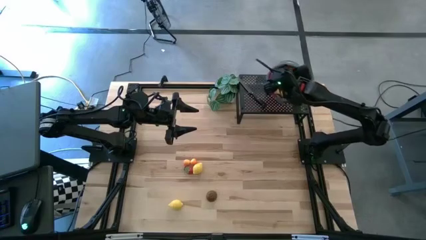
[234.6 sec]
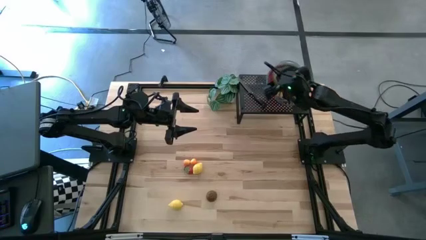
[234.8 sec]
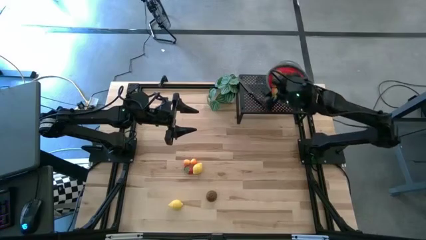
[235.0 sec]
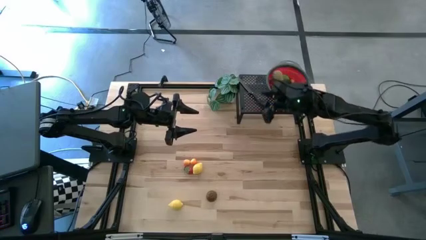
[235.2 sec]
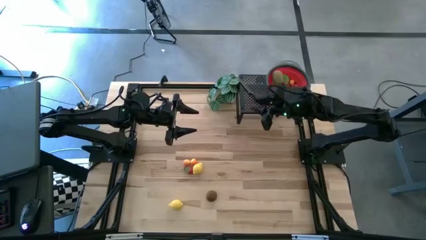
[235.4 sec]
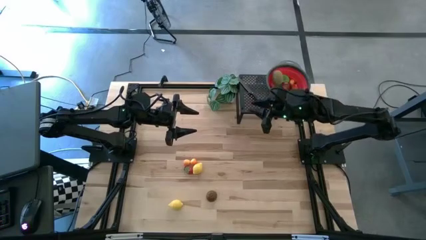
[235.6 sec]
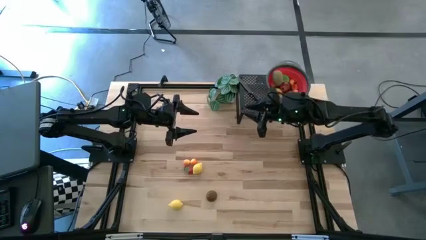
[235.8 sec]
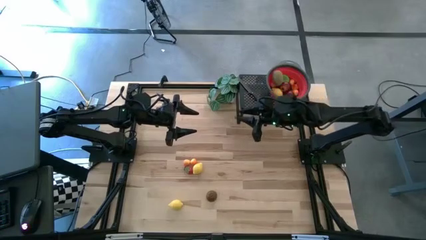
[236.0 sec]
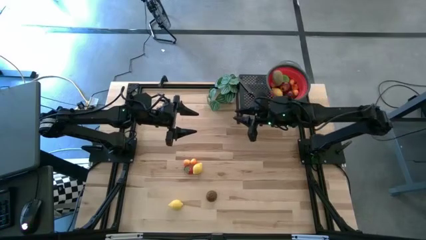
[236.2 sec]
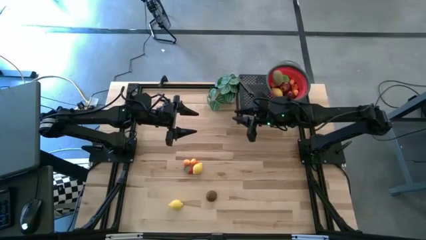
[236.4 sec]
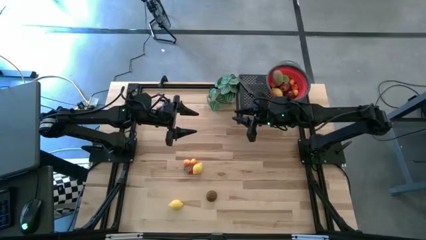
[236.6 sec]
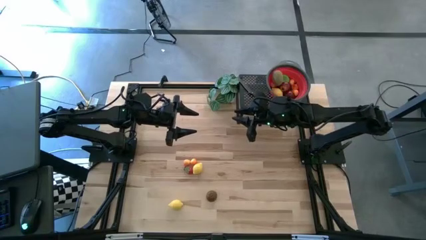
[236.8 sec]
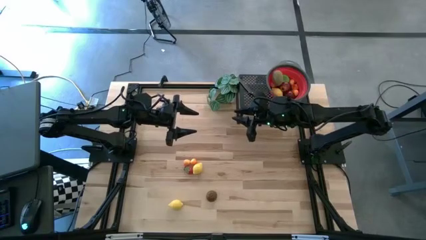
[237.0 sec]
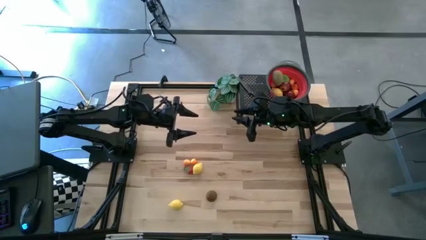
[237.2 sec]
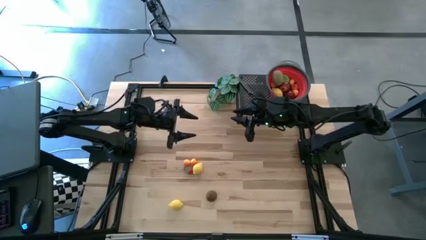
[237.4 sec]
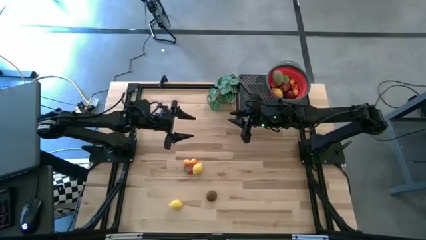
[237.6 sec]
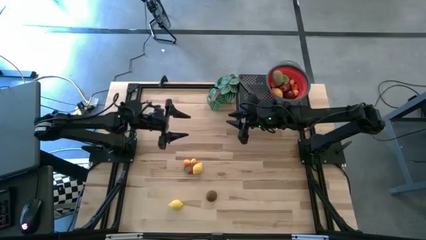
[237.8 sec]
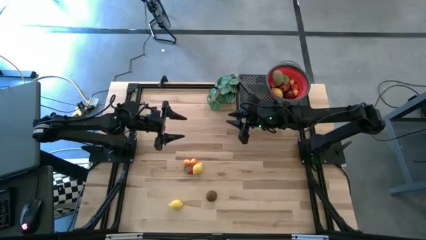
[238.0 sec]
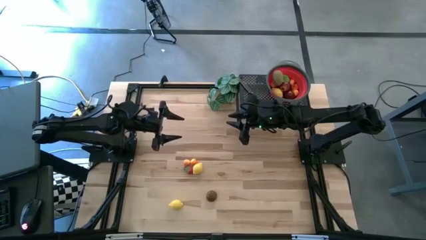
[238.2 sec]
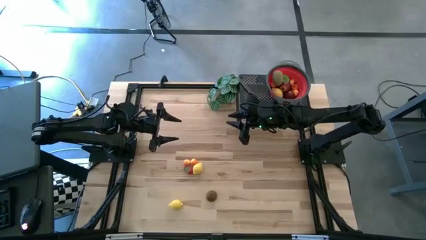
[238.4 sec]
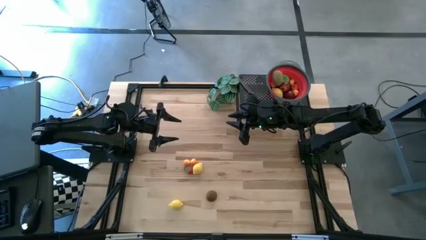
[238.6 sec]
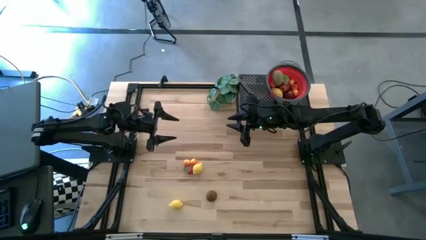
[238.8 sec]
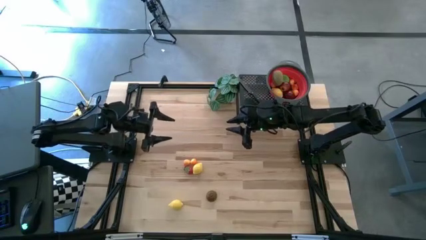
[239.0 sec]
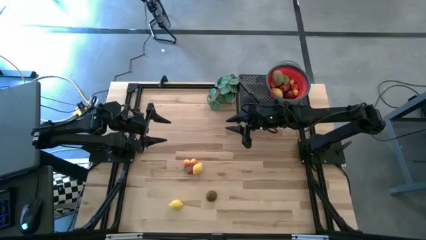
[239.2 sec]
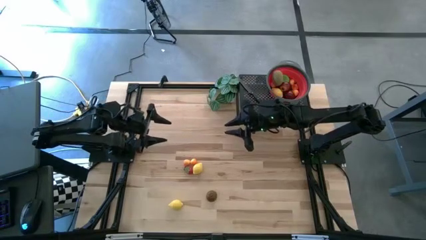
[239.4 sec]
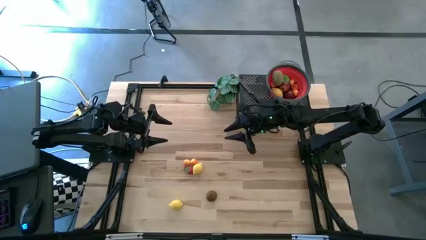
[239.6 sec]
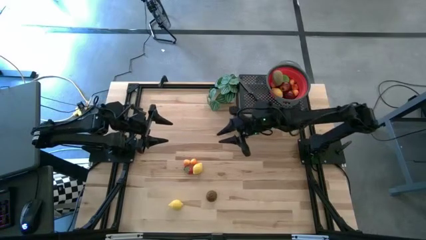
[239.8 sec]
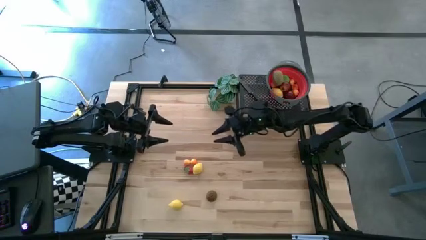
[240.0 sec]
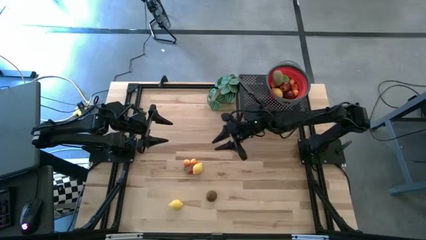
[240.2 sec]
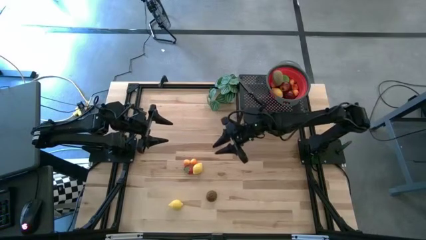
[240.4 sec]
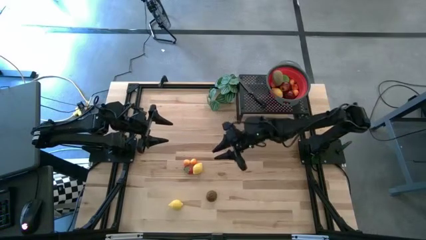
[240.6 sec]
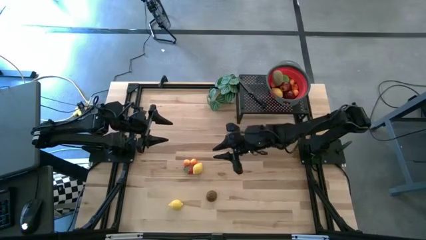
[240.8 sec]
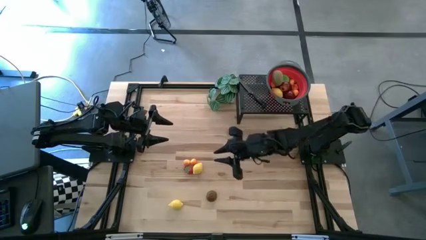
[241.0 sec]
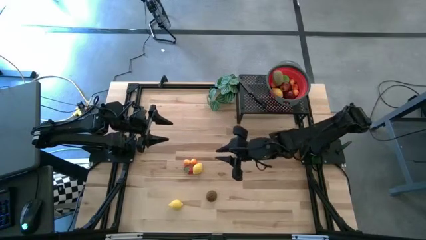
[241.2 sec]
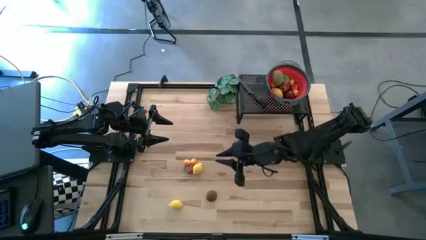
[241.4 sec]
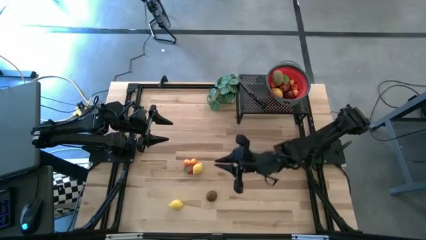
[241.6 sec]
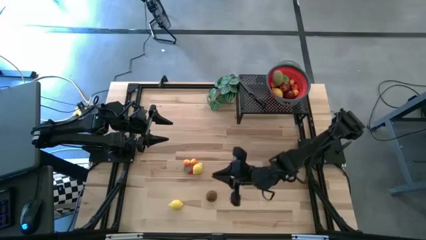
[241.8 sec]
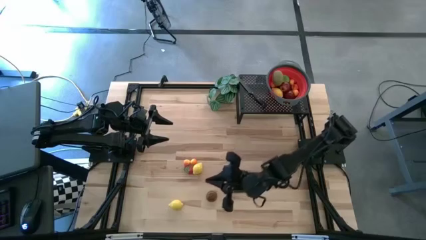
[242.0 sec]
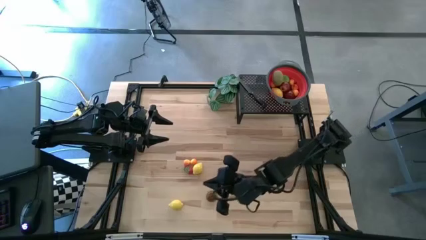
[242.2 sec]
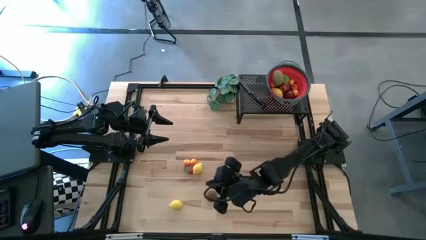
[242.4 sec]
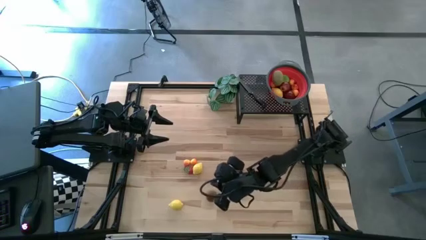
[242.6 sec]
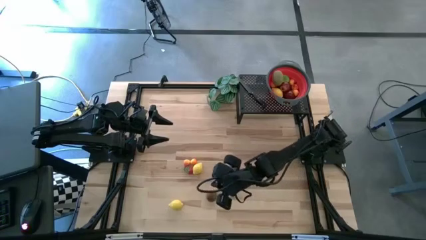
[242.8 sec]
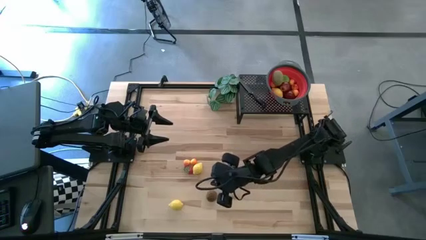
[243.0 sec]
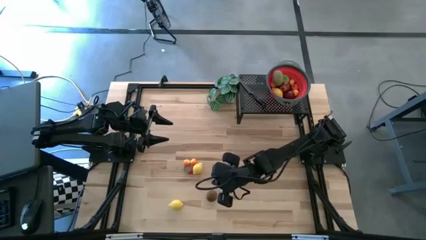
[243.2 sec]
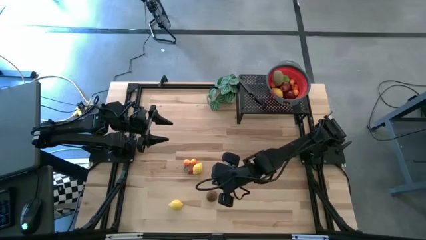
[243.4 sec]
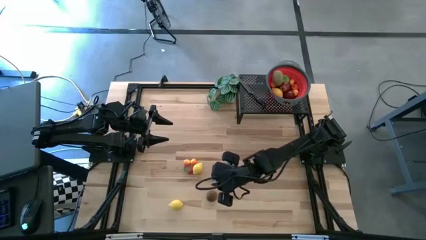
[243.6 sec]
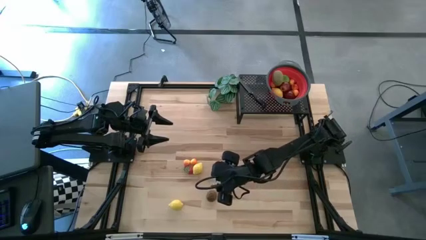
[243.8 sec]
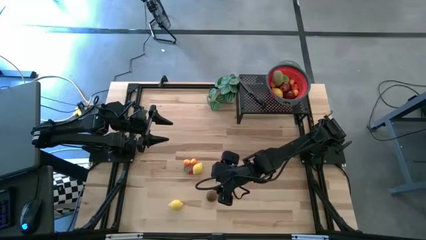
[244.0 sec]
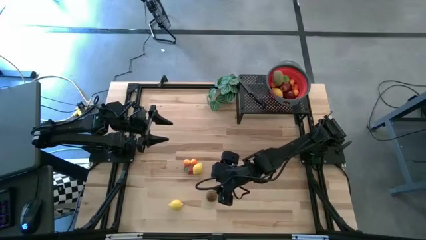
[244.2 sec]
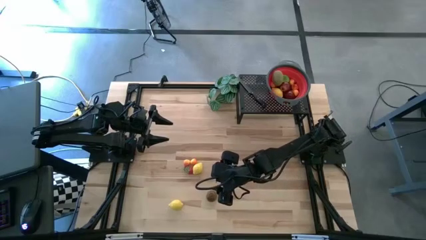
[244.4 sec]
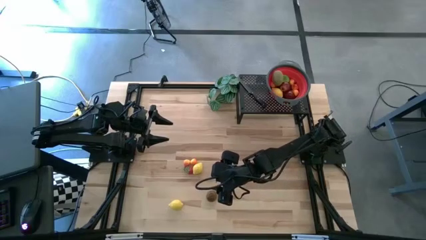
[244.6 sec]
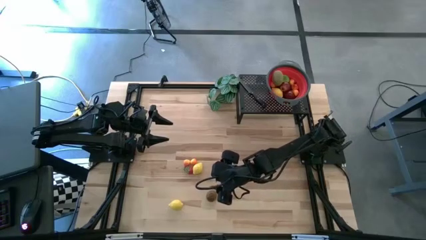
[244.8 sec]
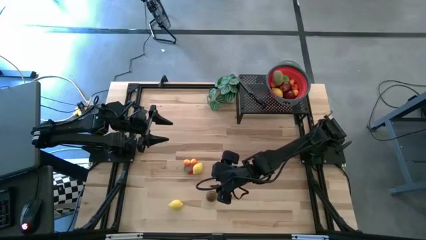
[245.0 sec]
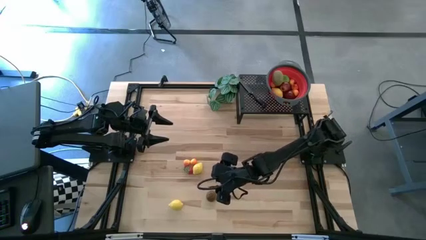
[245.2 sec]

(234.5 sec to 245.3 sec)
Task: Pick & Place Fruit
Put the half brown kiwi into the red strainer bowl

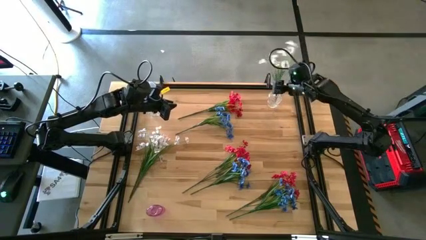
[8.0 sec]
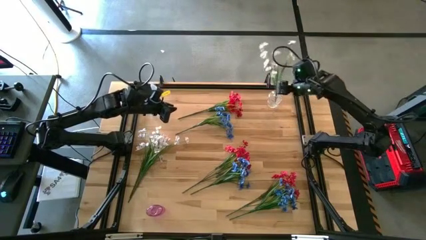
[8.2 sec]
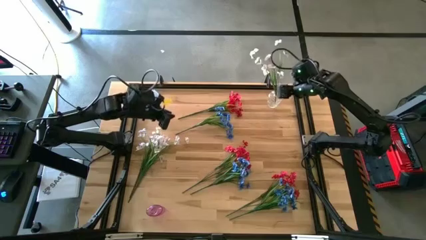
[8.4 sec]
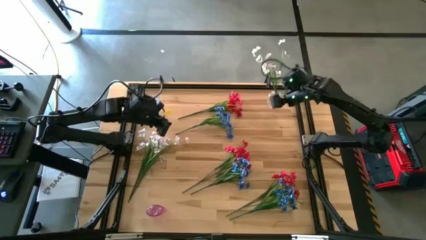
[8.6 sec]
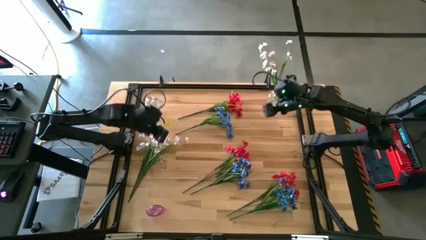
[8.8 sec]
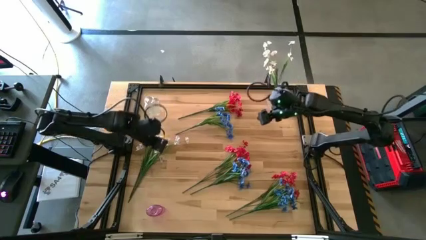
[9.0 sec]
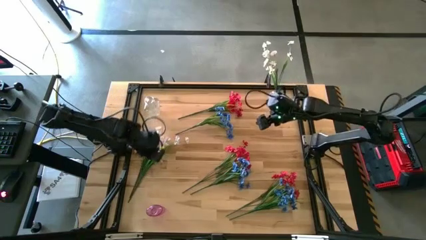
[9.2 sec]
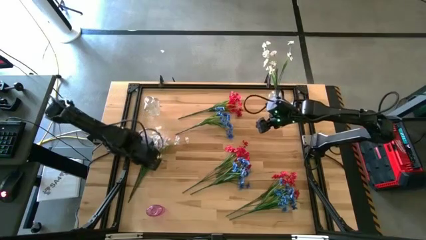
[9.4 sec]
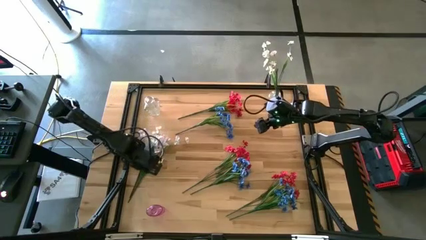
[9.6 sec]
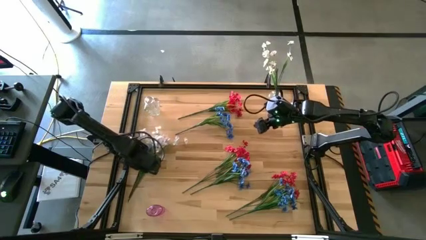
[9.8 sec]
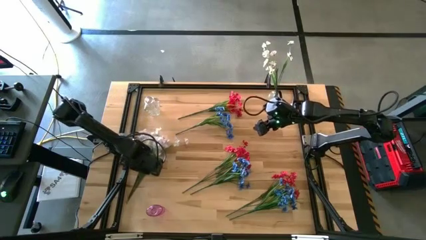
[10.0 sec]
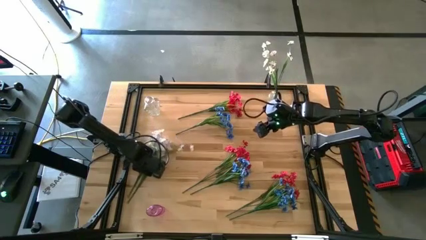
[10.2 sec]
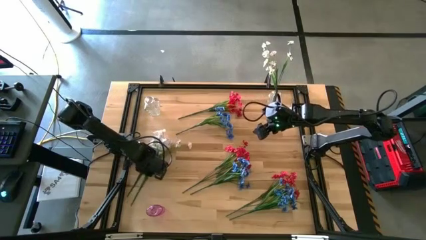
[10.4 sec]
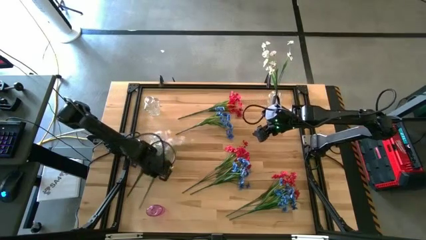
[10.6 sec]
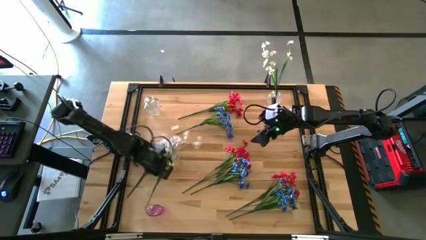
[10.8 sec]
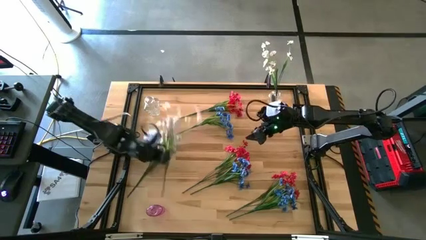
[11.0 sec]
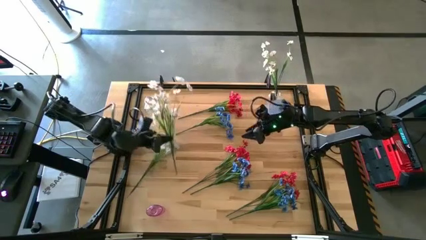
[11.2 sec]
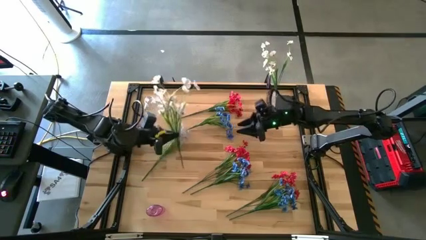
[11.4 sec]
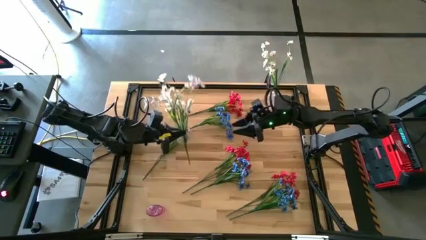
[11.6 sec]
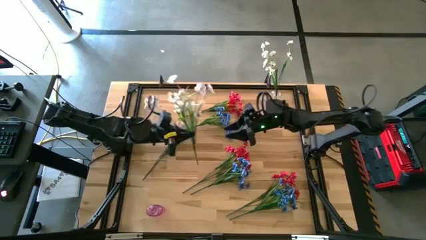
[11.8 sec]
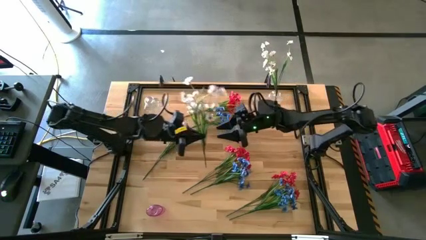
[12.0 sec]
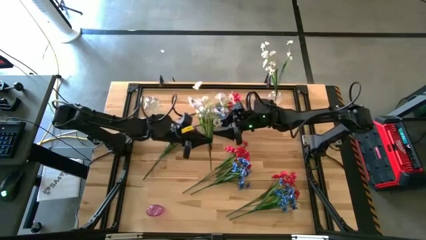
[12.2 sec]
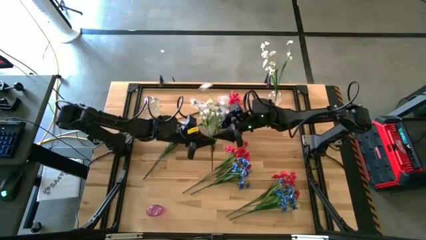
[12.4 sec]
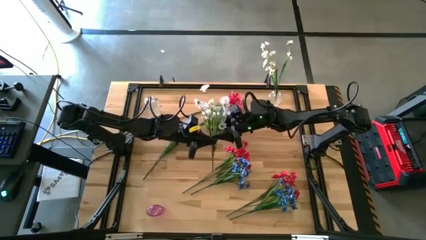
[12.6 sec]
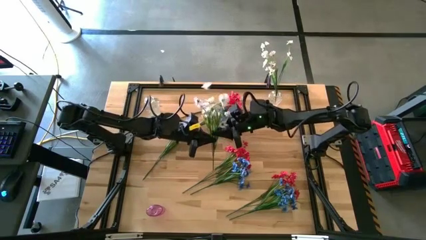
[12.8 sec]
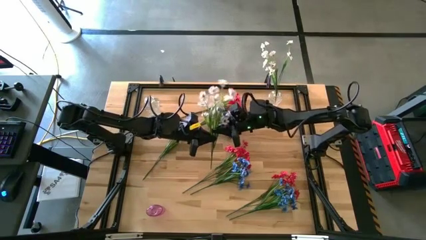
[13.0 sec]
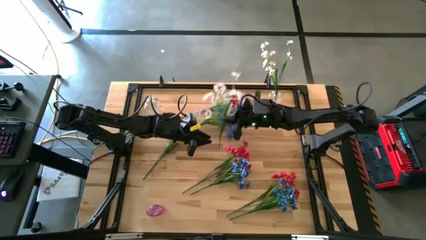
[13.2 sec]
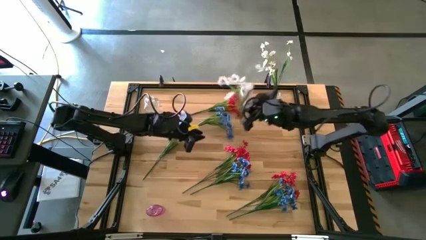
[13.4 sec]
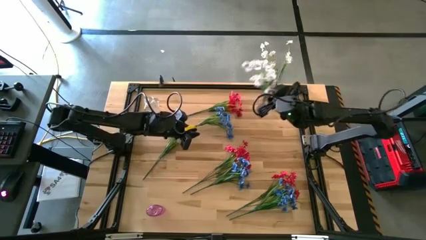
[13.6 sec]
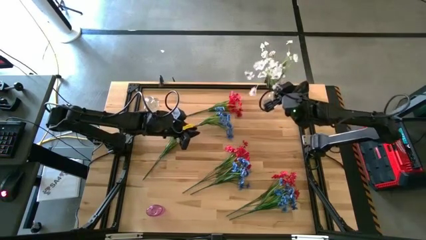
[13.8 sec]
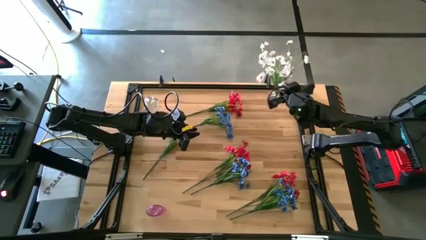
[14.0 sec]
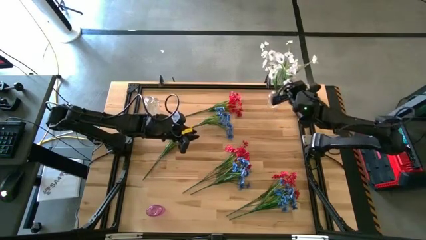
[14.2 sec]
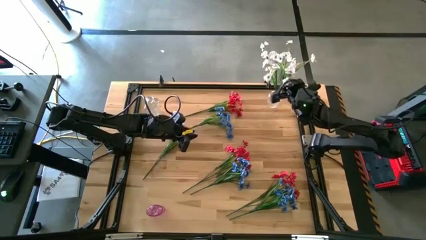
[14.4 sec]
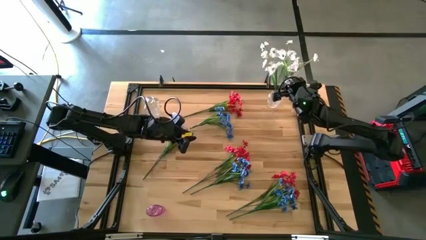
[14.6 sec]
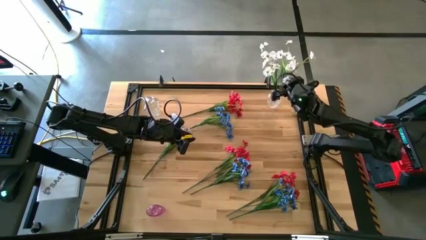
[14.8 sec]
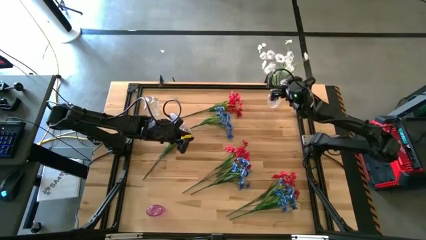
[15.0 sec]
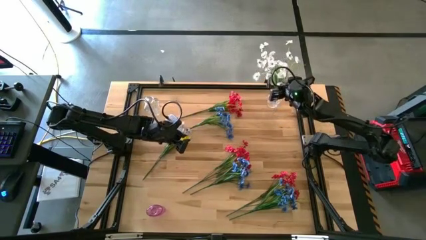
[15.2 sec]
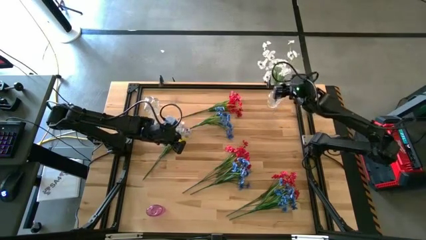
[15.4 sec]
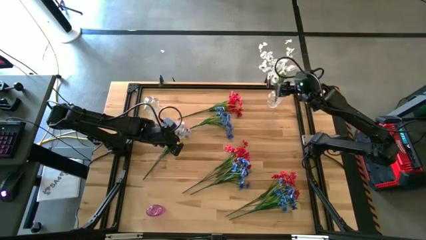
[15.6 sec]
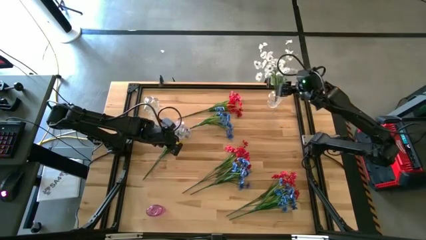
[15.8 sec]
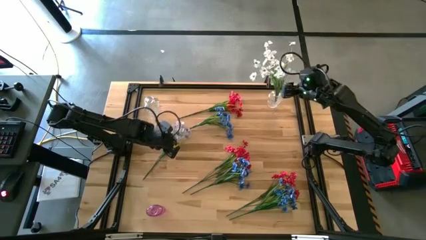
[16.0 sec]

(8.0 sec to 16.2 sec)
Task: Sort flowers into vase by color
Put the right white flowers into the right transparent vase
